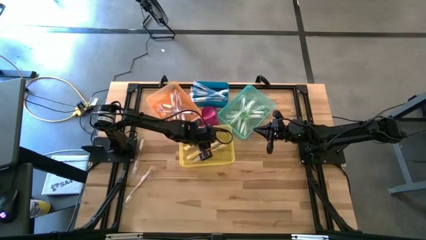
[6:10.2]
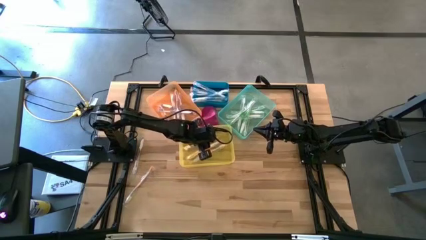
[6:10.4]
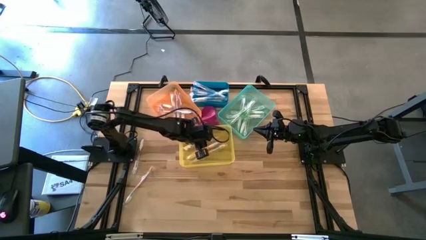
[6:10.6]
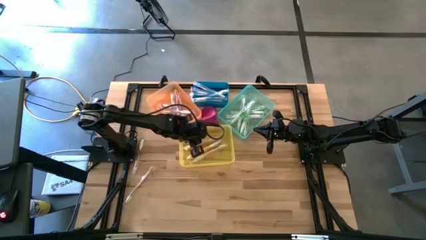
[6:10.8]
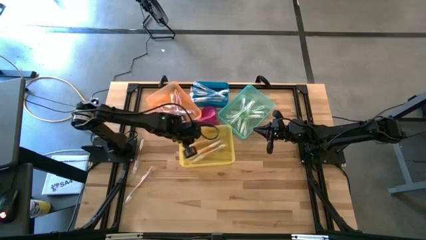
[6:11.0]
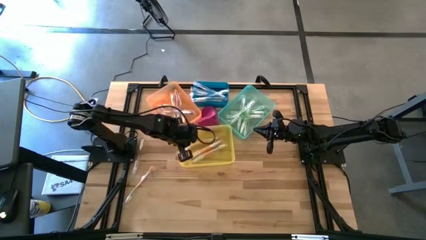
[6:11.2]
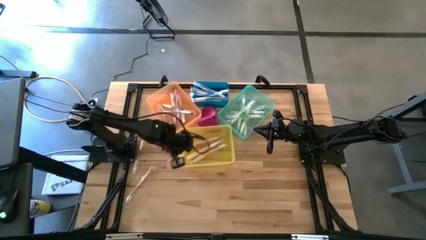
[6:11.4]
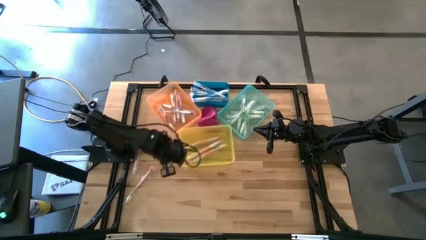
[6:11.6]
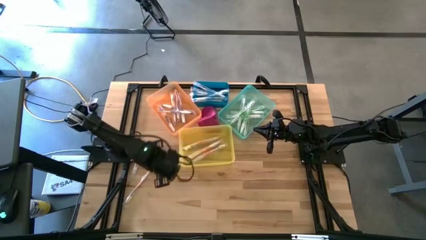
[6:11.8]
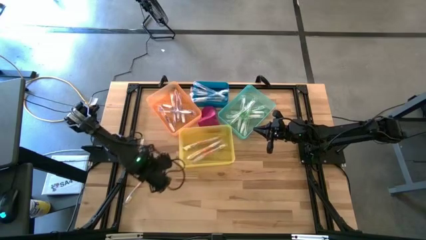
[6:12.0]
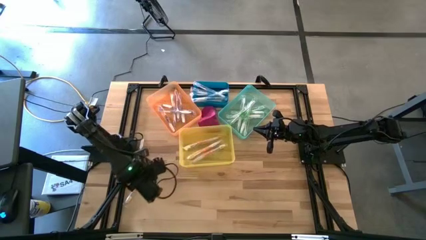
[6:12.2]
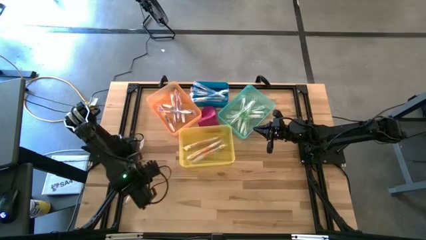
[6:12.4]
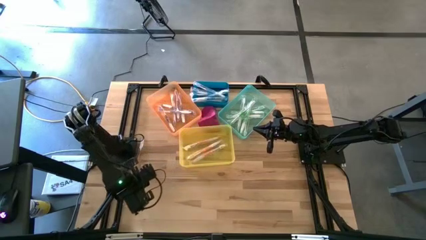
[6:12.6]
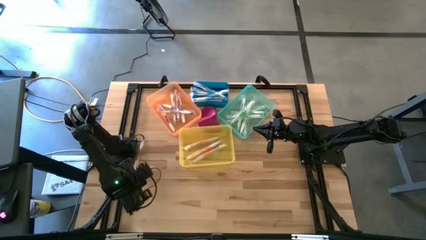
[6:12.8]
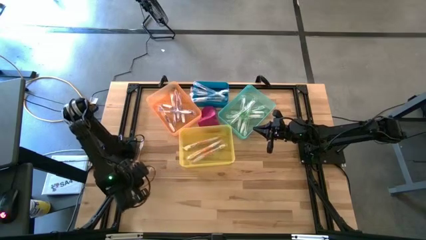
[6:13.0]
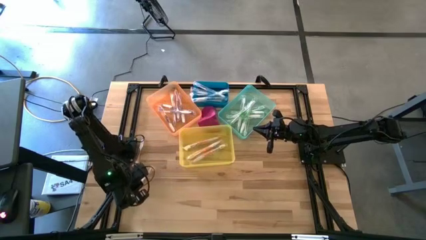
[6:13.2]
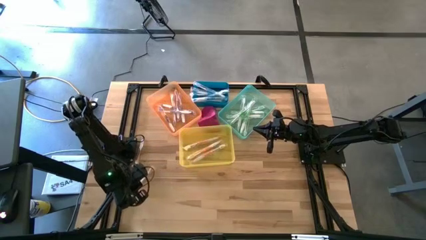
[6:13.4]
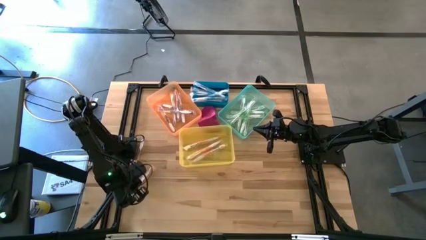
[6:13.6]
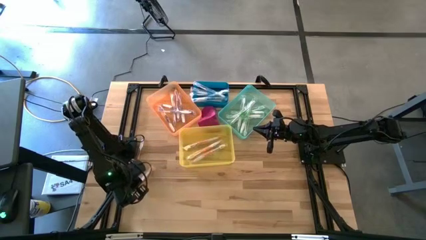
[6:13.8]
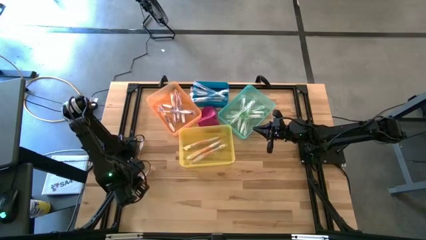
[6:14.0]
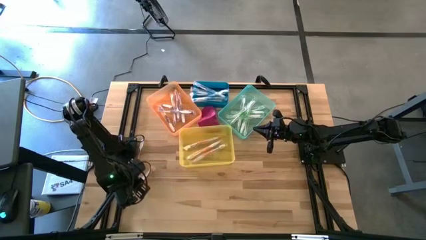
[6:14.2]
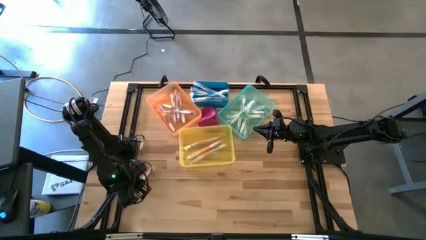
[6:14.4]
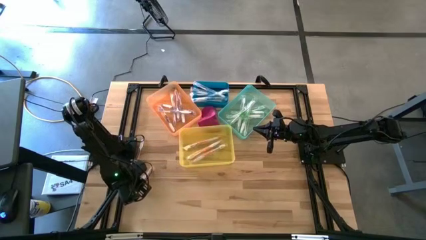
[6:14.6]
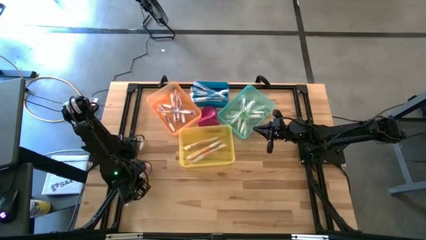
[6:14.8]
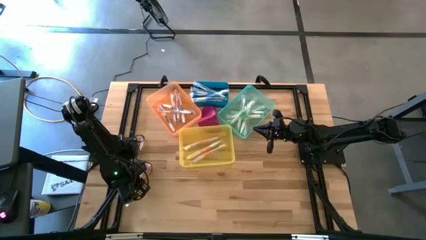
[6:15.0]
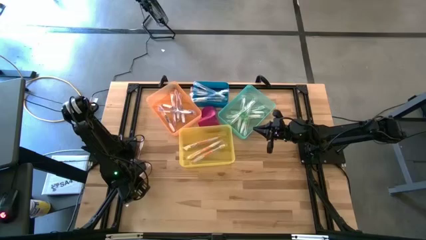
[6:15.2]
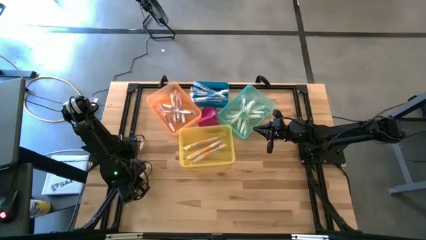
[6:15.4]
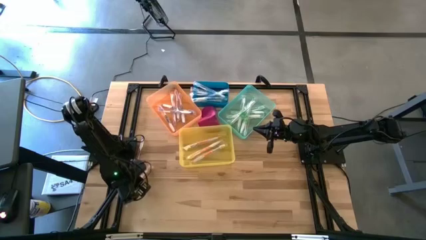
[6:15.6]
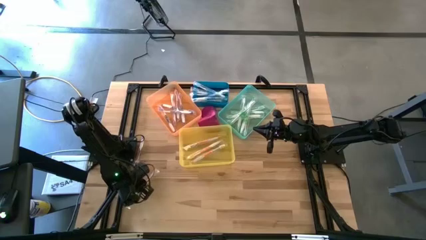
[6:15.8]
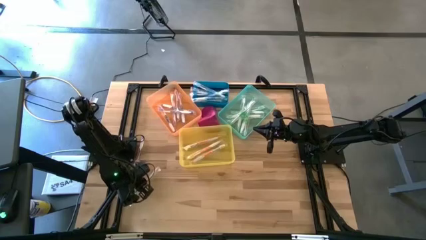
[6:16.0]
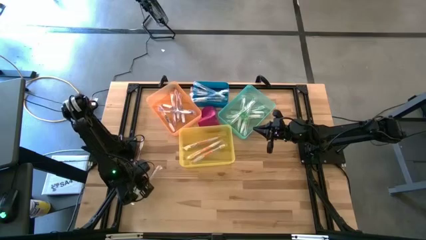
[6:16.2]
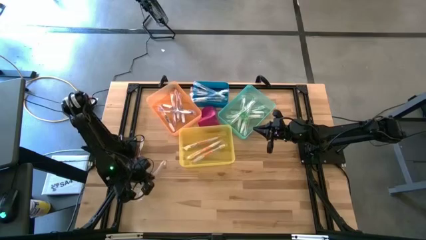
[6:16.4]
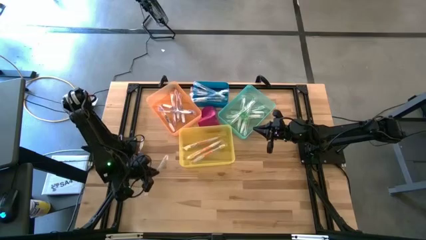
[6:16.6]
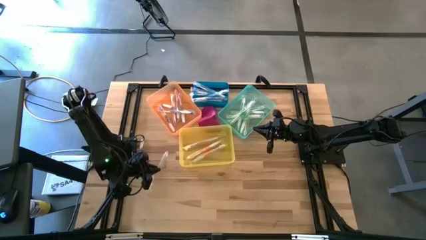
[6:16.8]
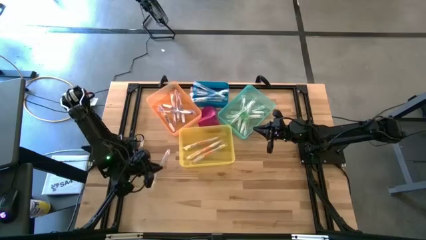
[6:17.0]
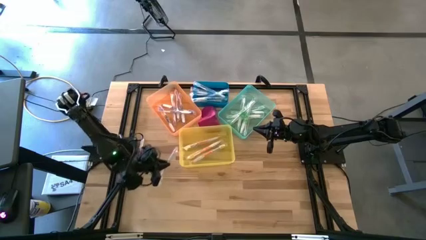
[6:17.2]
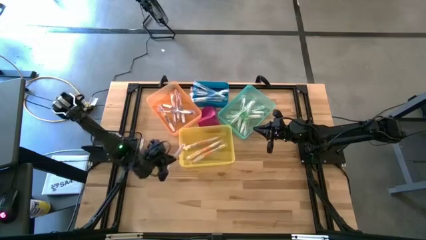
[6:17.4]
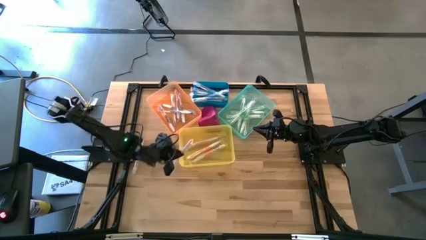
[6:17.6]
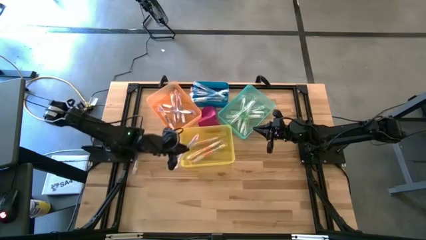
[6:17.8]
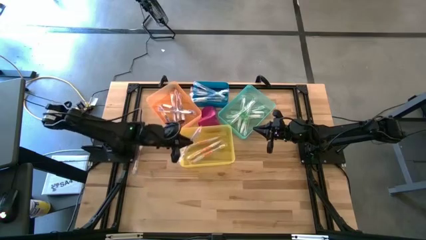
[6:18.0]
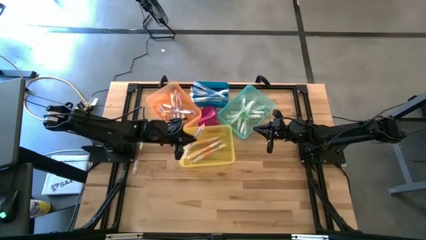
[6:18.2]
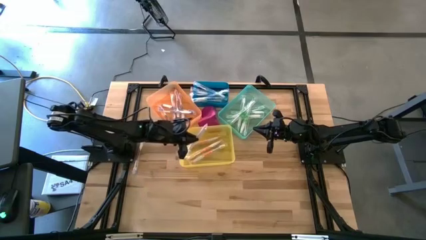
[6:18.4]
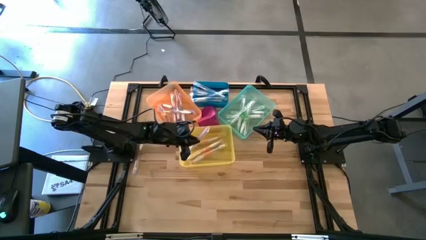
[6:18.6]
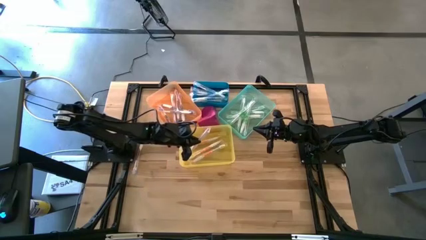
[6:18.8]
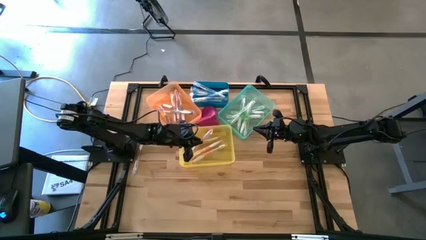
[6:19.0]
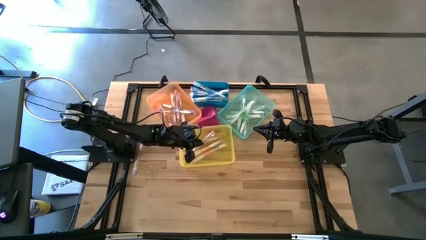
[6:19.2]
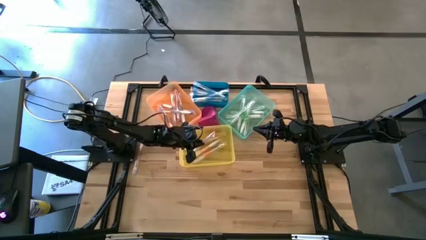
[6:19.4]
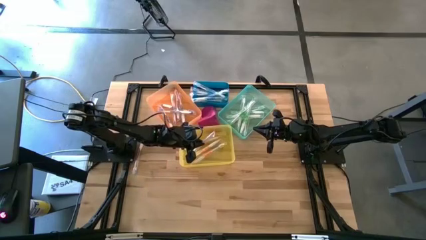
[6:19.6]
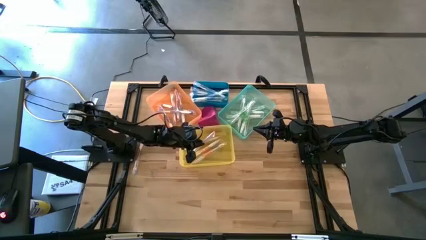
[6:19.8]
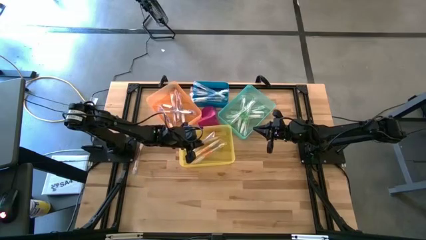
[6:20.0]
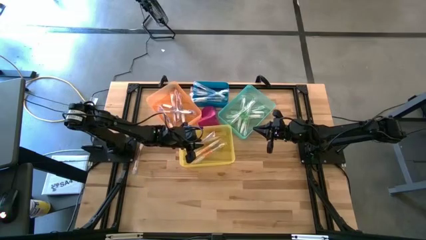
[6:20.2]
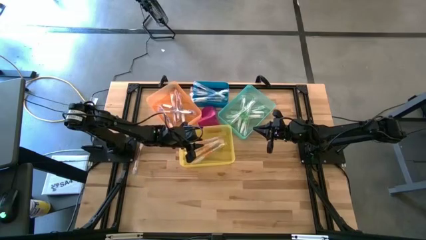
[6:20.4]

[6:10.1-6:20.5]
Task: Pick & Place Toothbrushes
Put the orange toothbrush into the yellow bin
